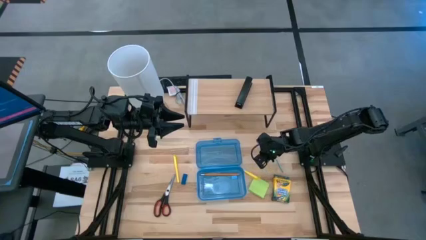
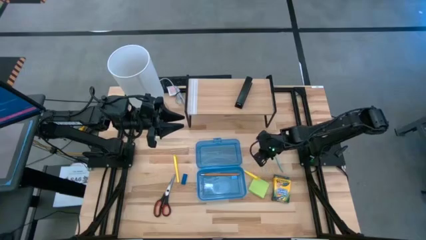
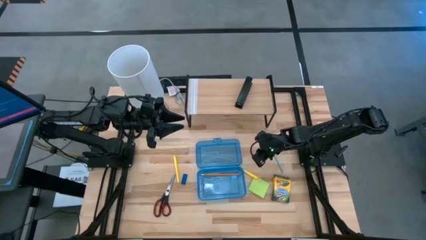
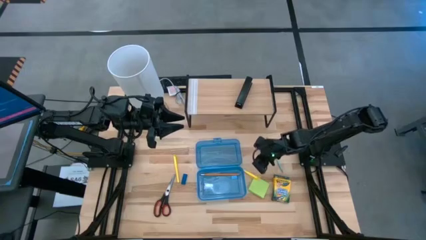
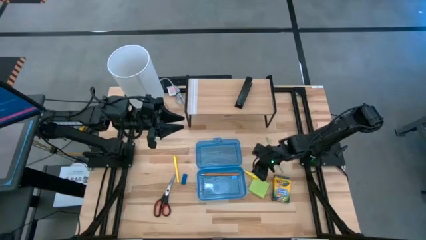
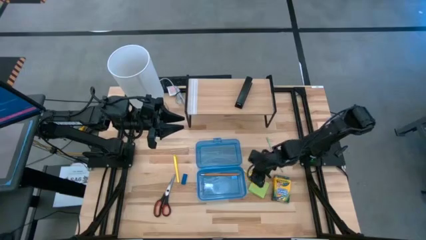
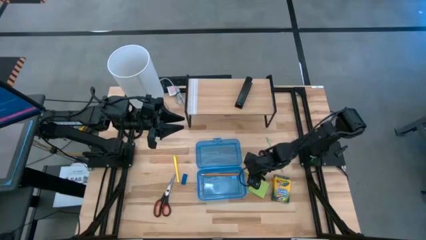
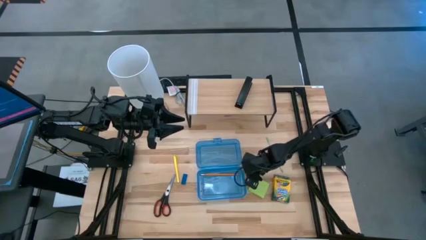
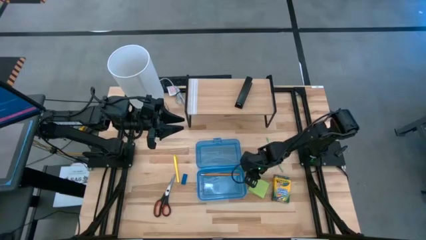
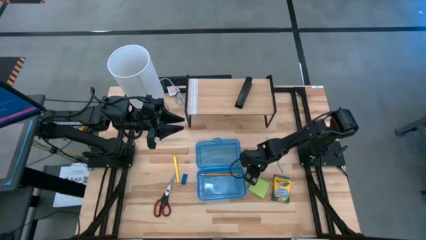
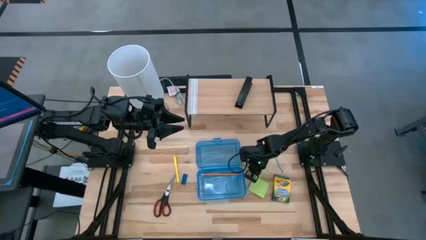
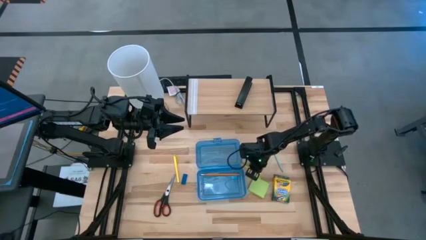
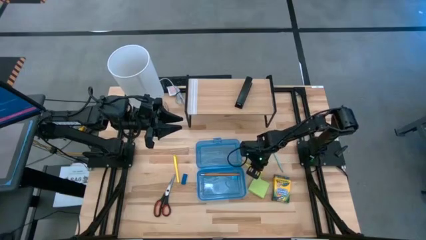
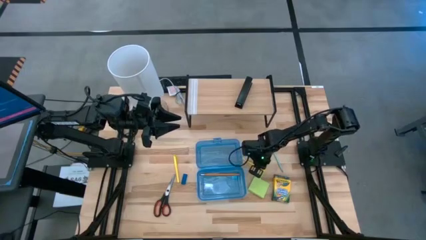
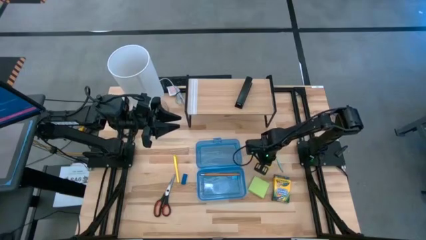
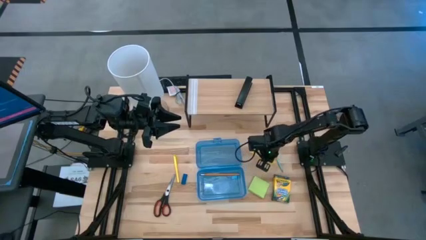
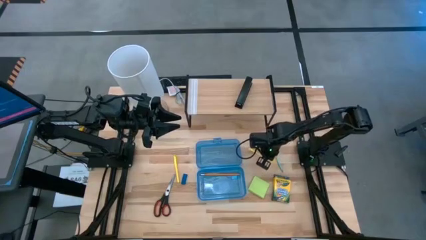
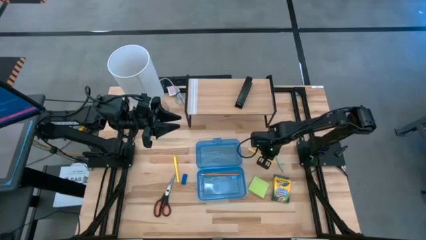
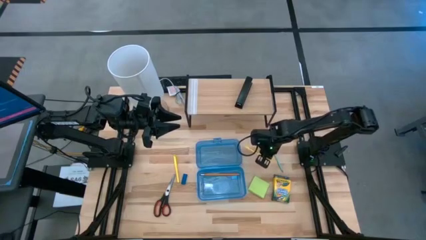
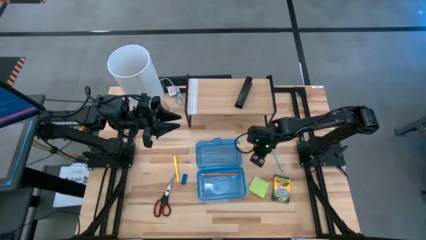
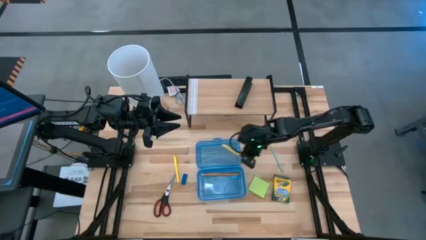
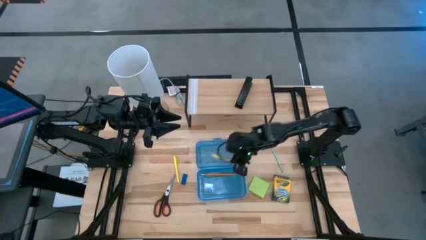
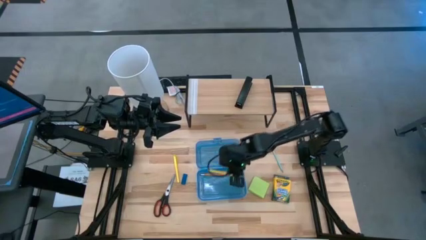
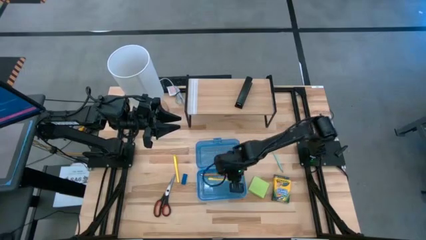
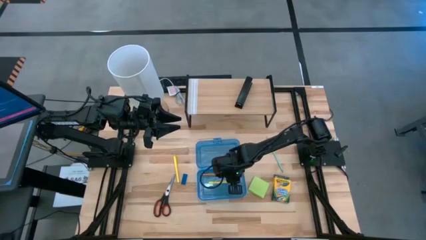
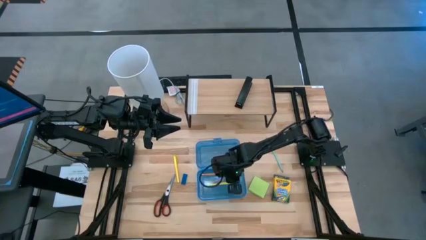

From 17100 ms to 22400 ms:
Task: Pack school essentials
Put the right yellow pen into the blue supply box

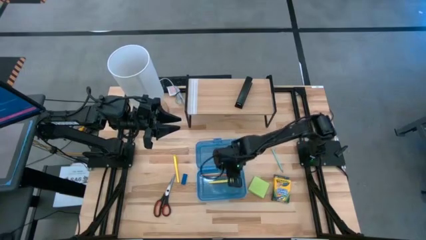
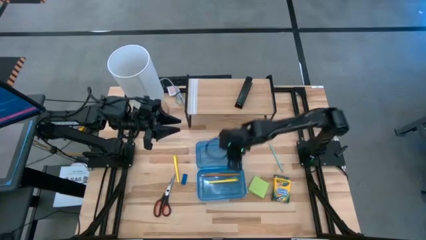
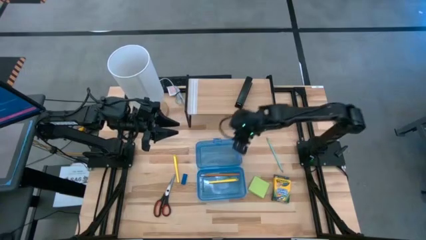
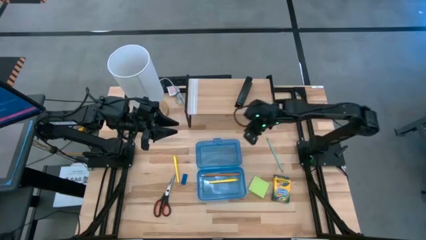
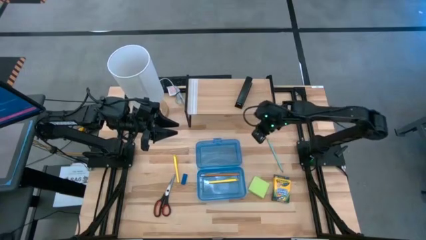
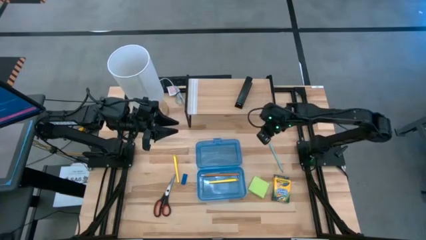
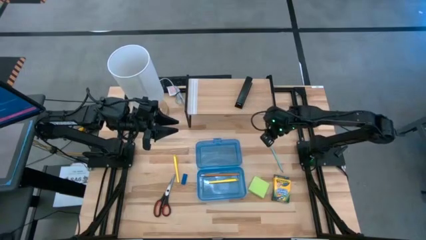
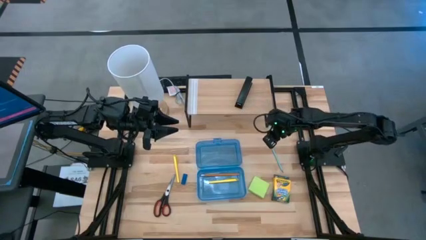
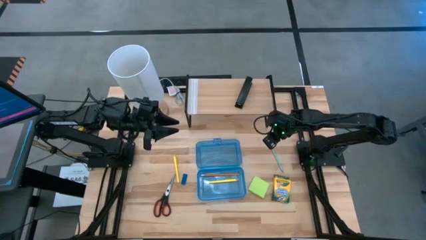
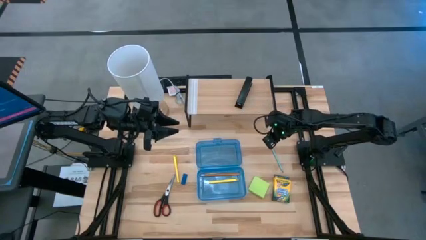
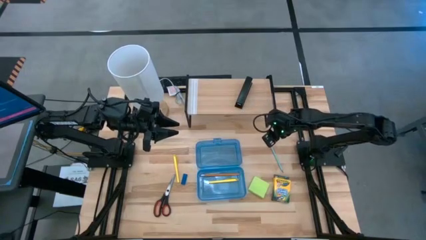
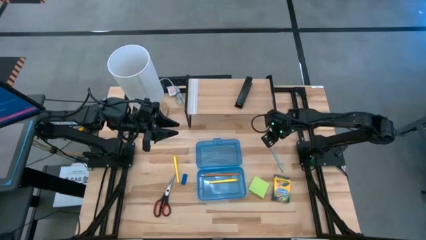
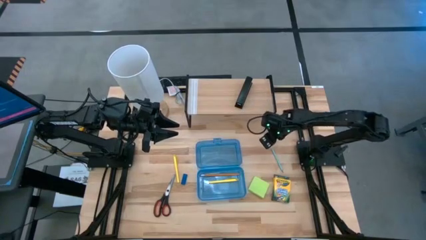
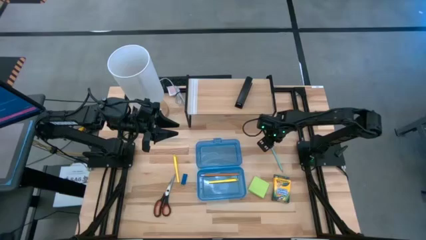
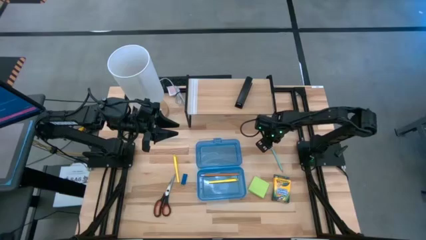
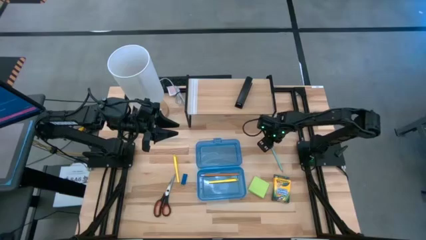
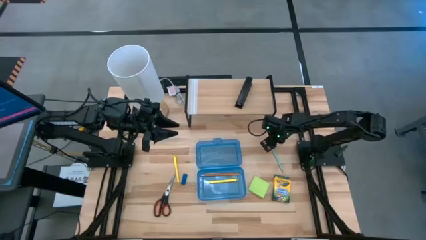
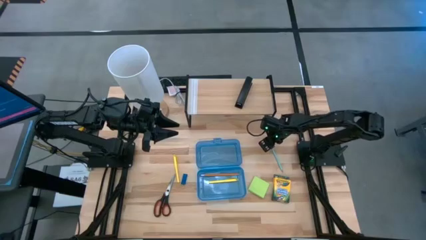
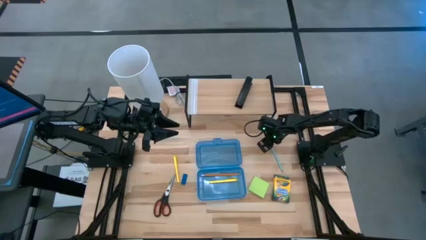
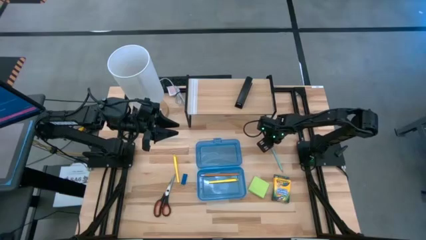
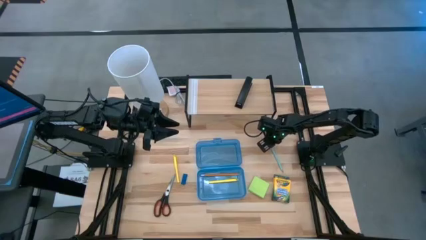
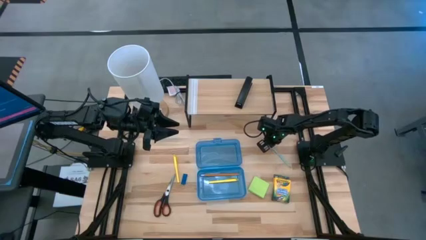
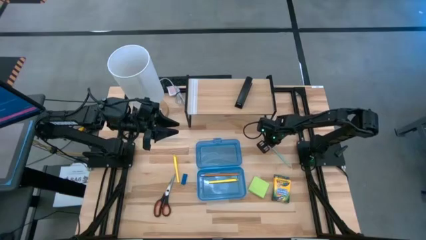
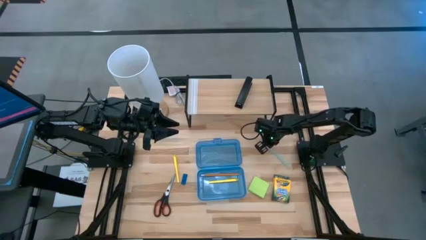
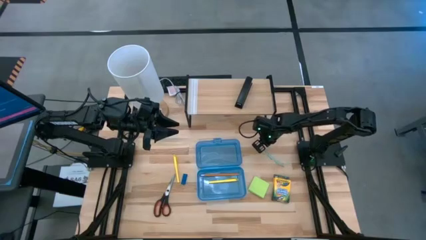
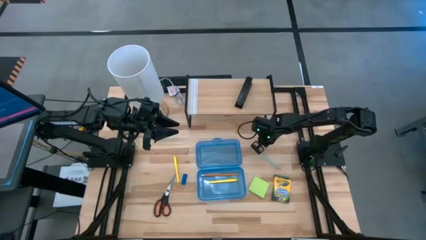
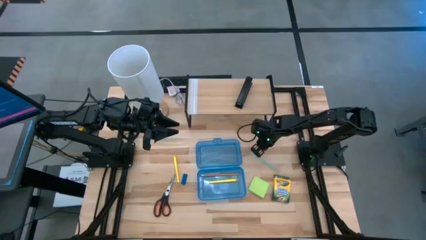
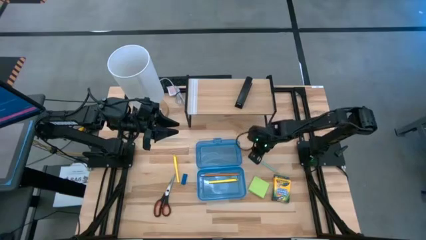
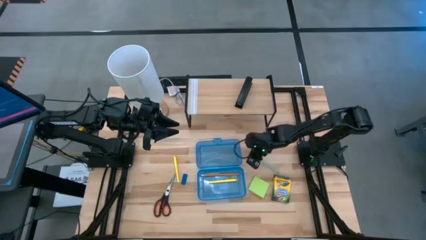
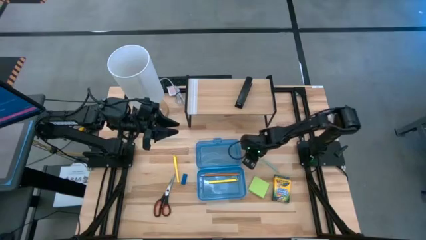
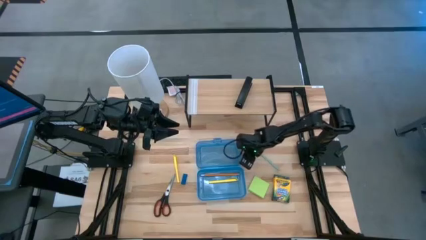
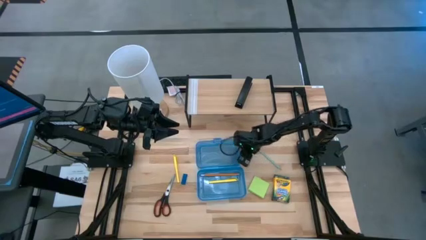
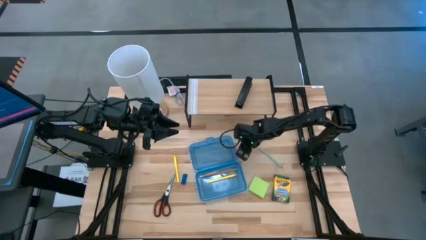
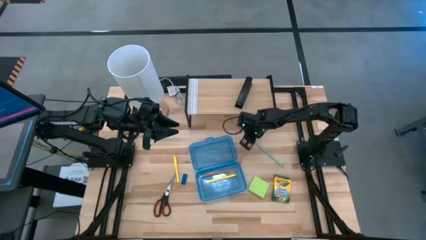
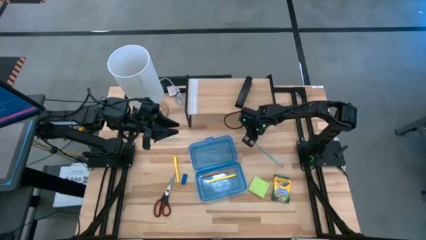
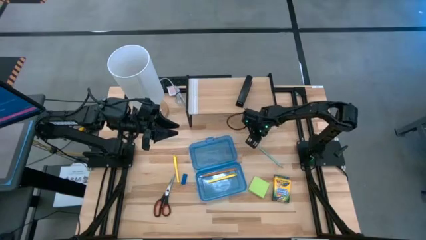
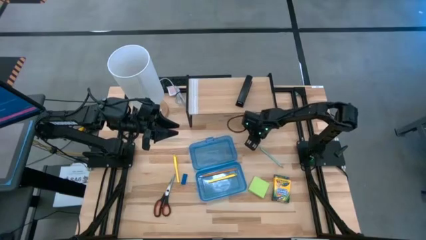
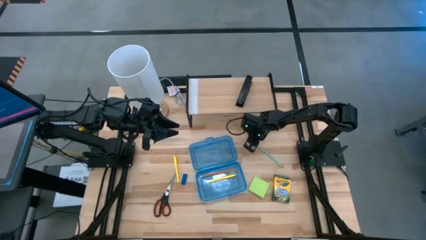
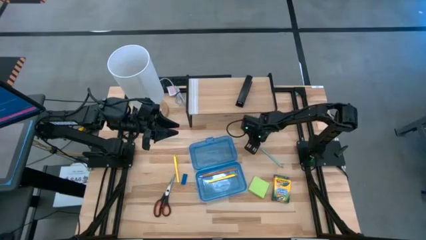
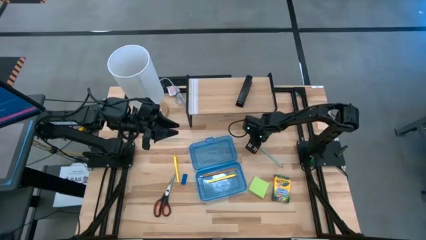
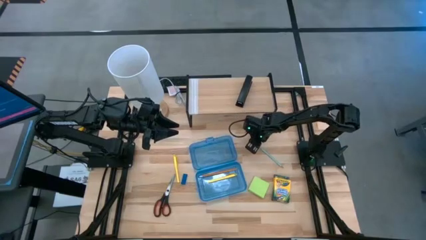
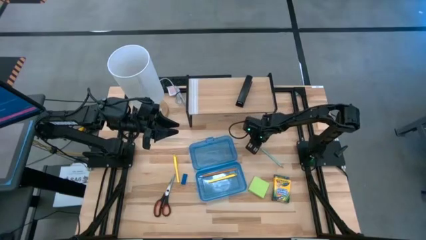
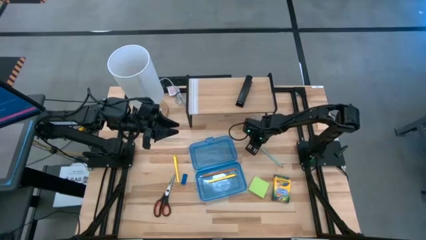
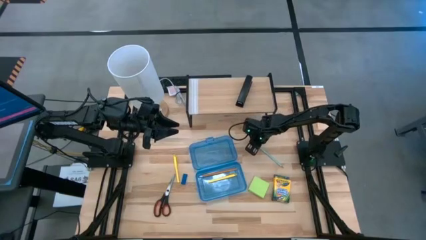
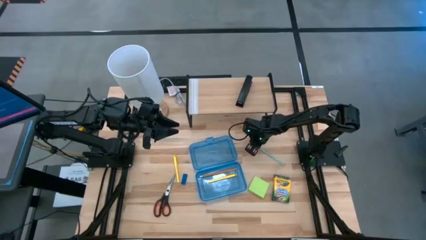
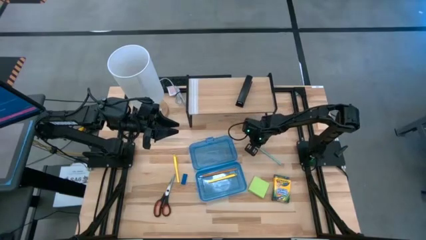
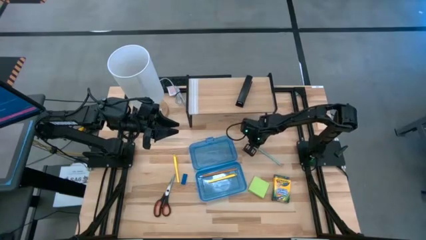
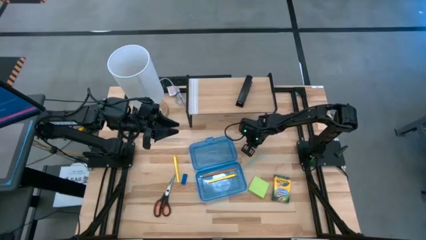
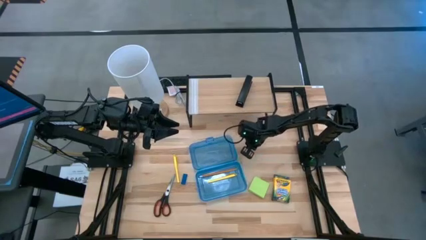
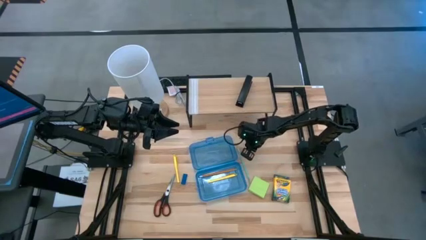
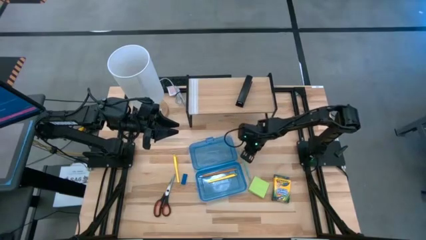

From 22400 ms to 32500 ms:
Put the blue pencil into the blue supply box
